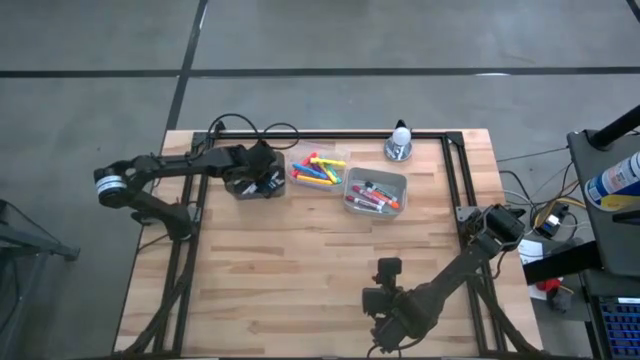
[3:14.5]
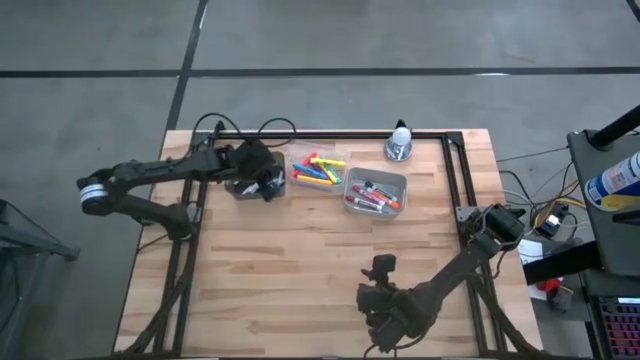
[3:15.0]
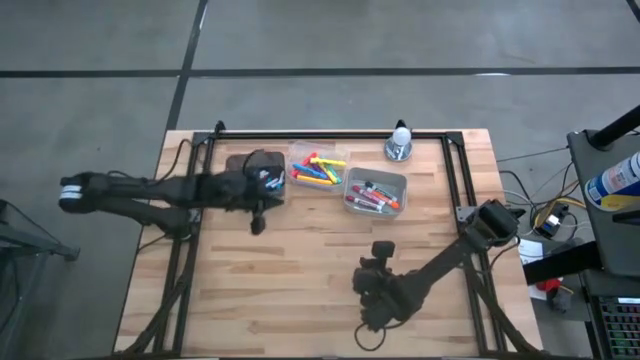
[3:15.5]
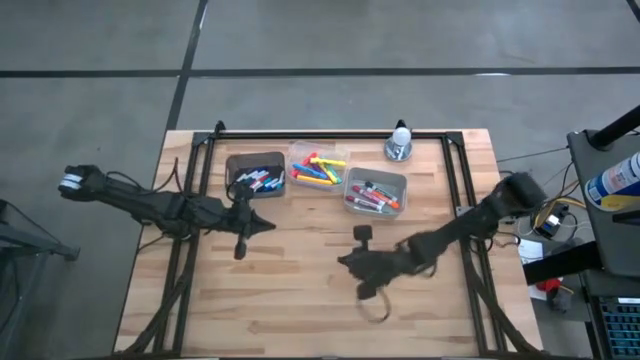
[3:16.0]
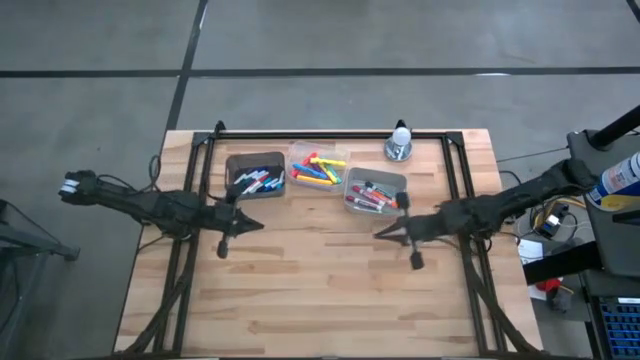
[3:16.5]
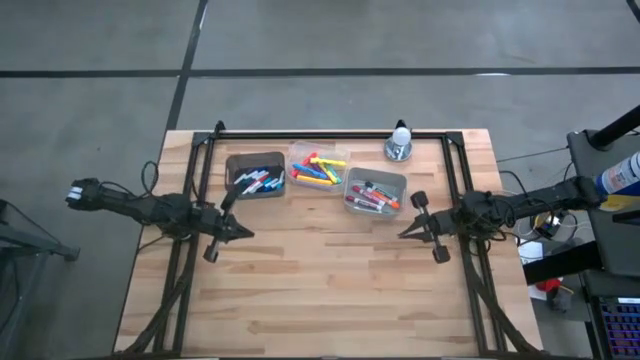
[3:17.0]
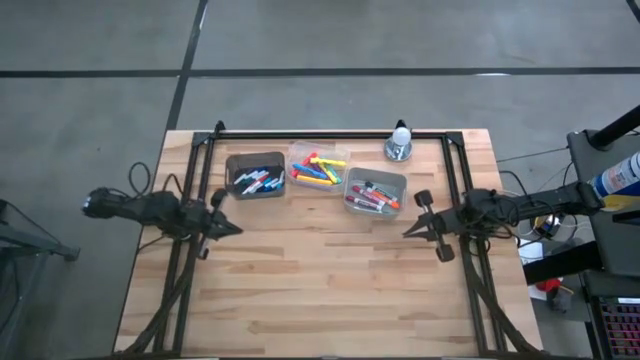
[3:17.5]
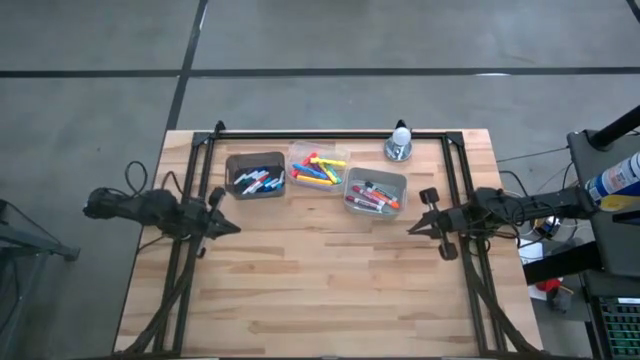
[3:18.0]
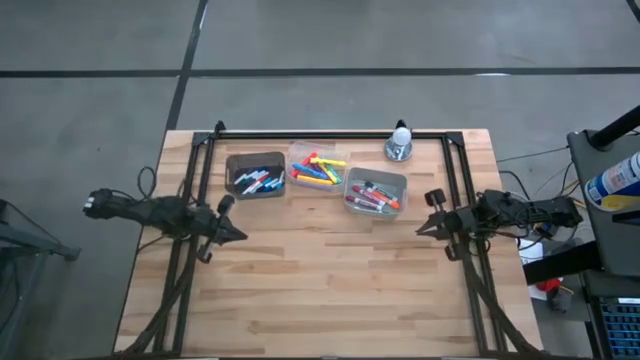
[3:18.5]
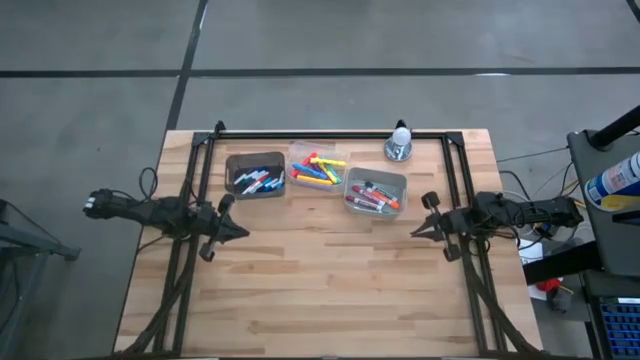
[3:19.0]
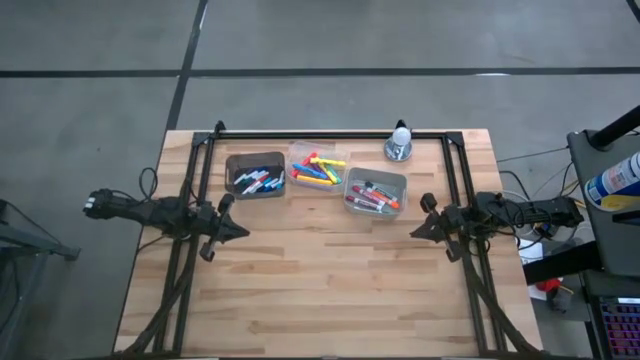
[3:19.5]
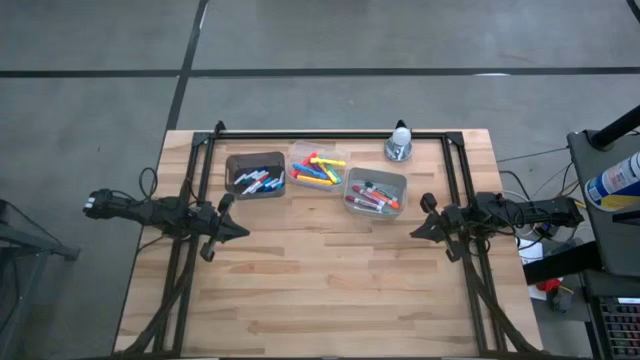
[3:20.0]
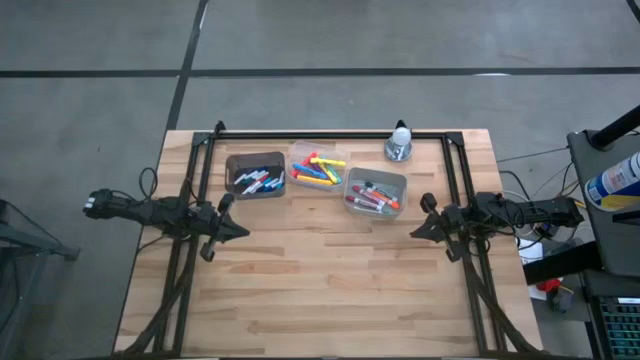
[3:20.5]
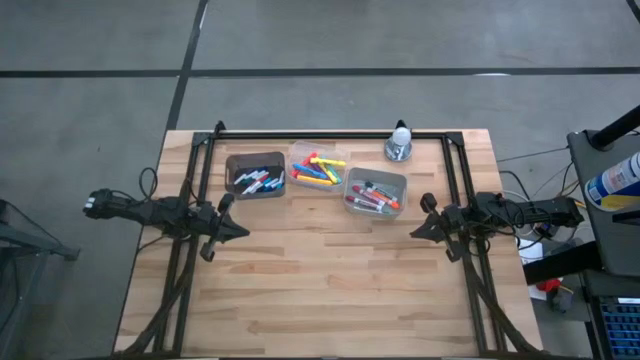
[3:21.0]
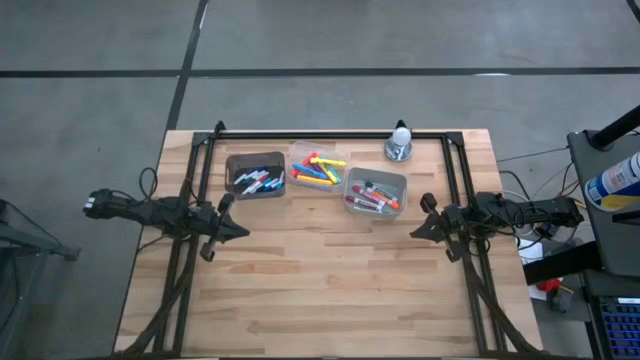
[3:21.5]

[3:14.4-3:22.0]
Task: Pick & Place Markers
Return to Home Position

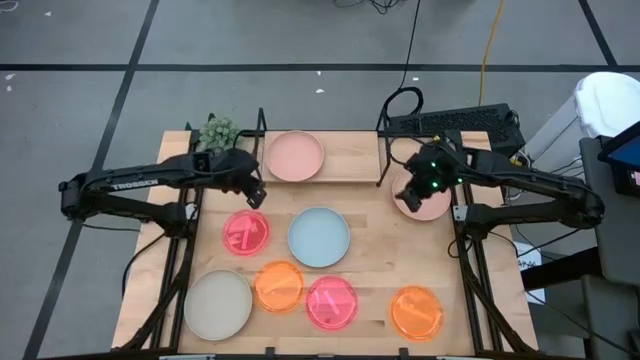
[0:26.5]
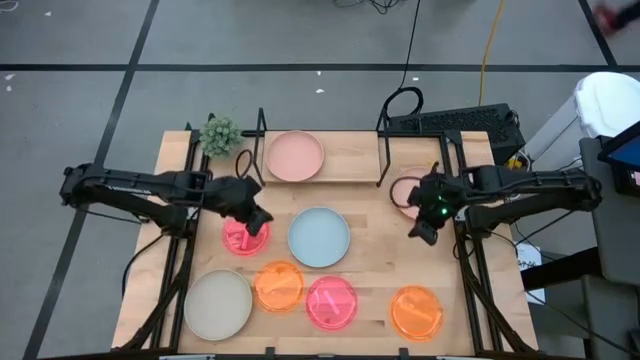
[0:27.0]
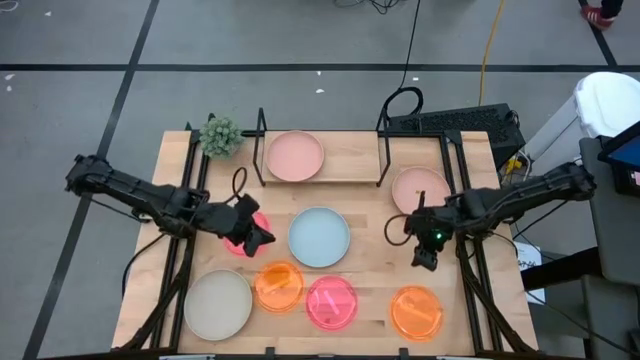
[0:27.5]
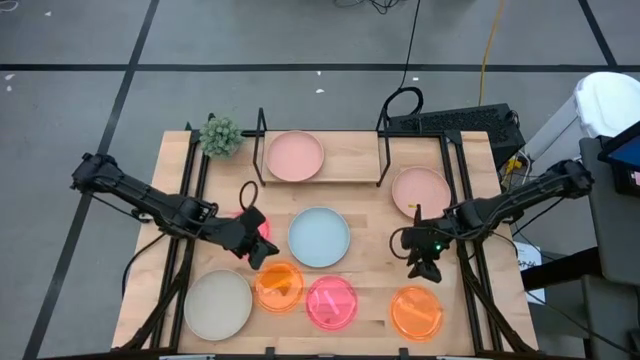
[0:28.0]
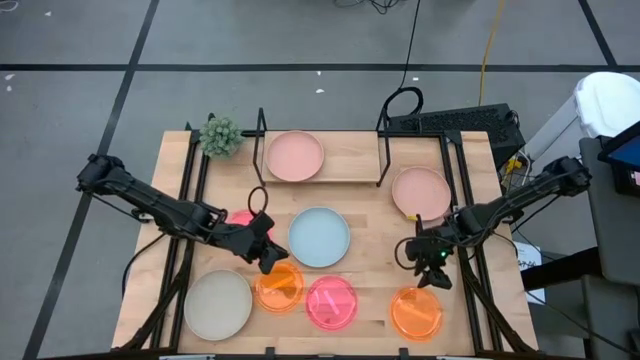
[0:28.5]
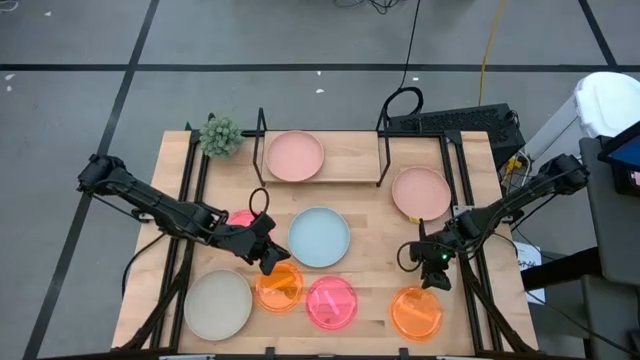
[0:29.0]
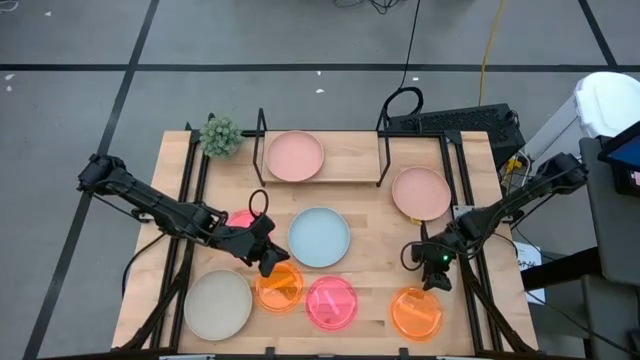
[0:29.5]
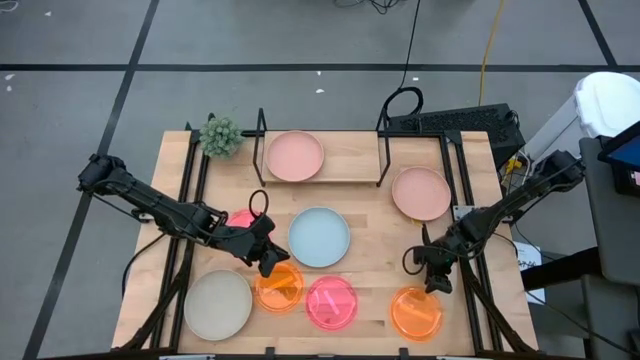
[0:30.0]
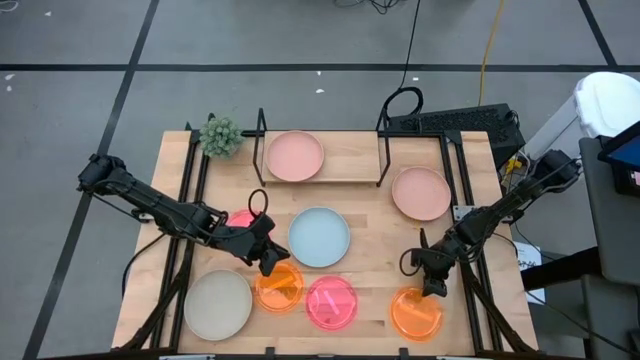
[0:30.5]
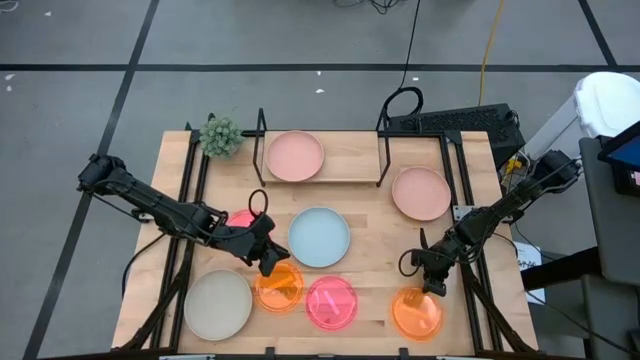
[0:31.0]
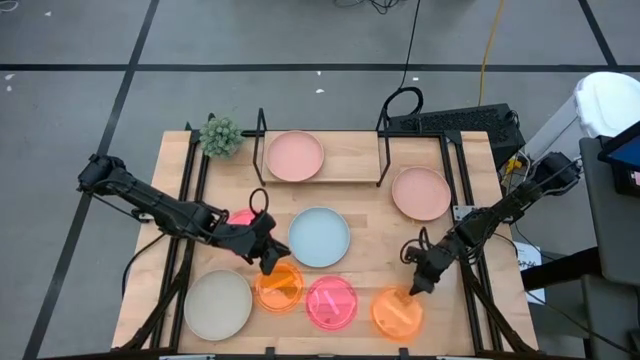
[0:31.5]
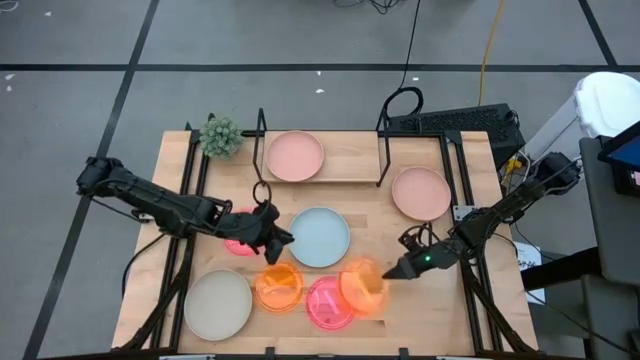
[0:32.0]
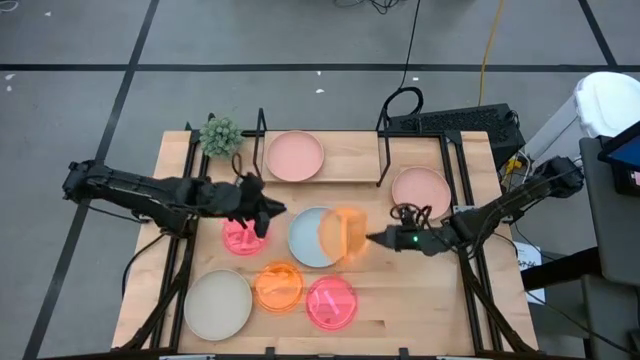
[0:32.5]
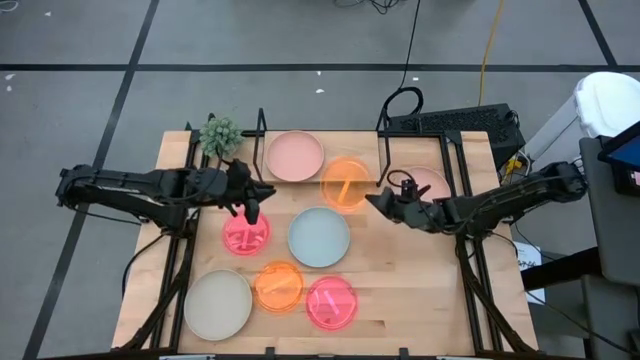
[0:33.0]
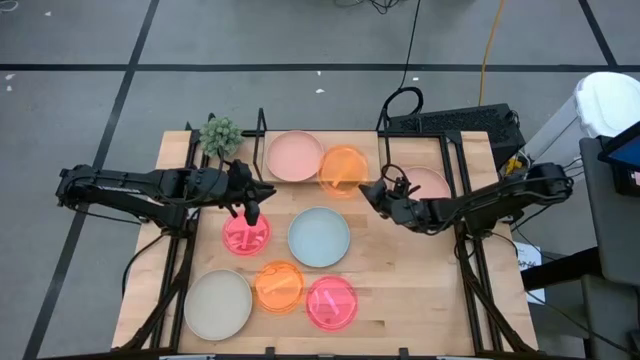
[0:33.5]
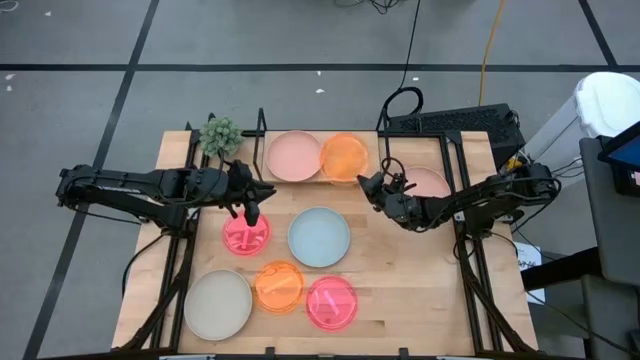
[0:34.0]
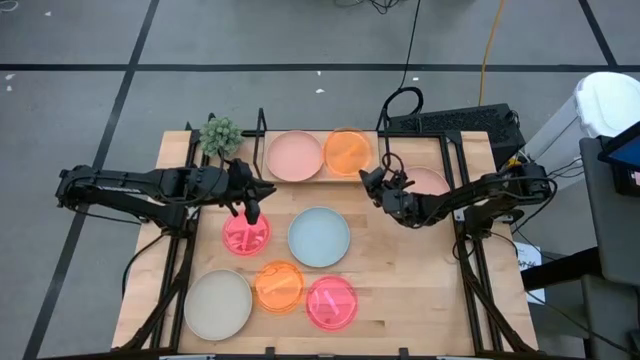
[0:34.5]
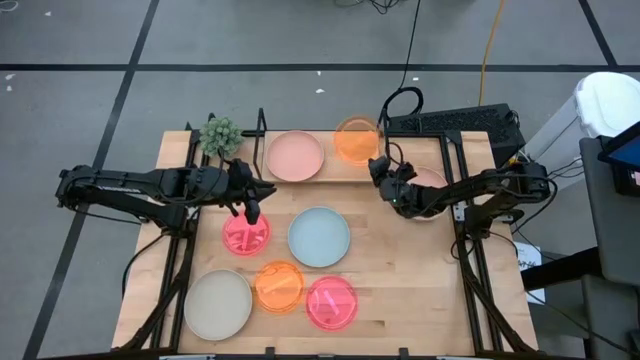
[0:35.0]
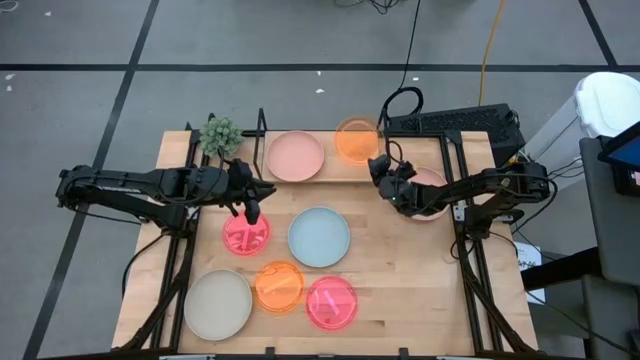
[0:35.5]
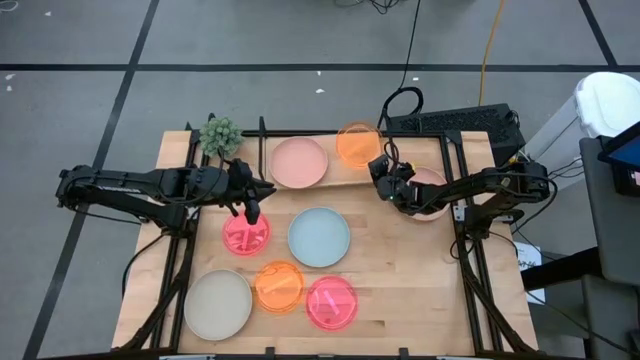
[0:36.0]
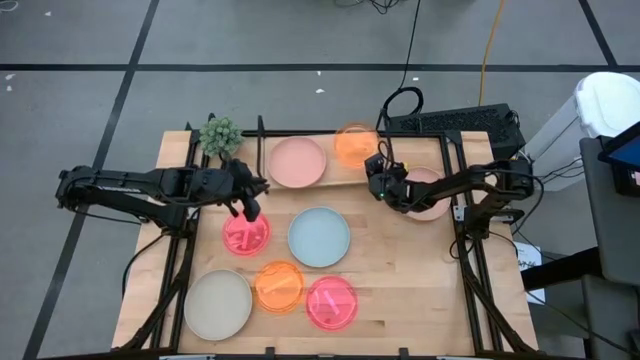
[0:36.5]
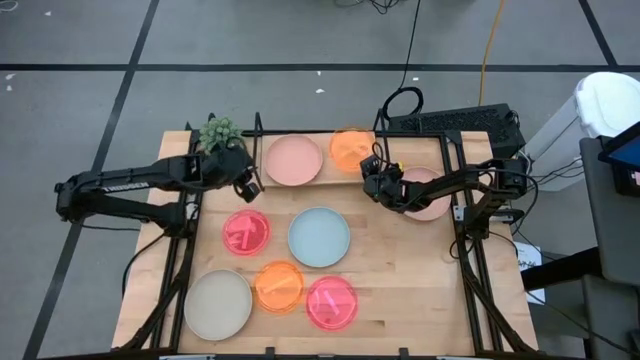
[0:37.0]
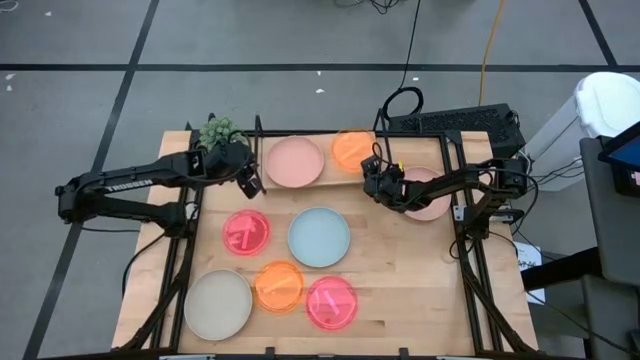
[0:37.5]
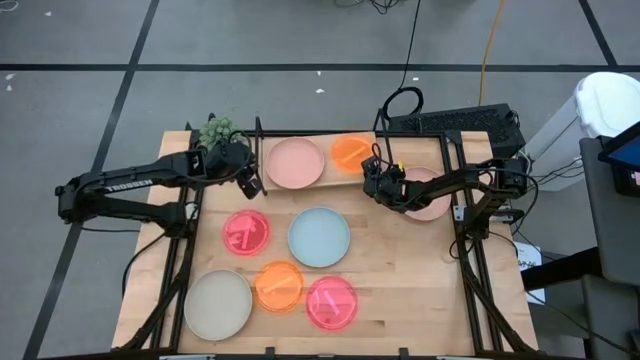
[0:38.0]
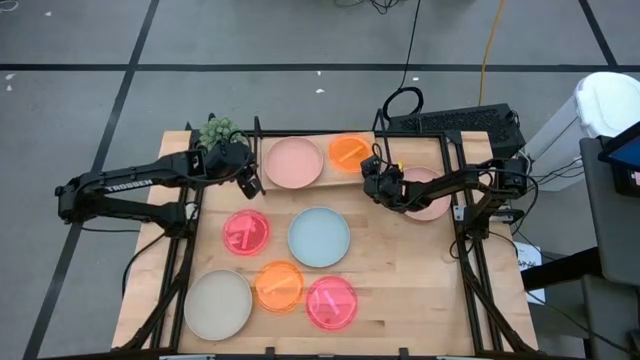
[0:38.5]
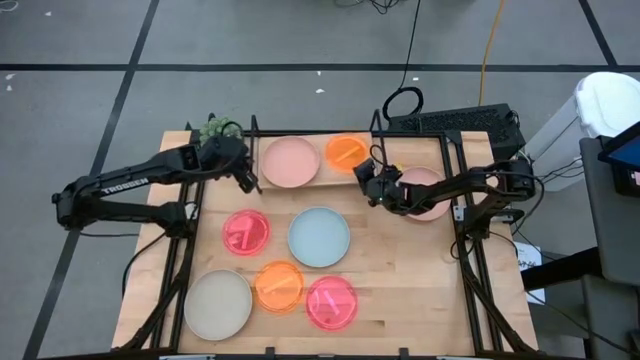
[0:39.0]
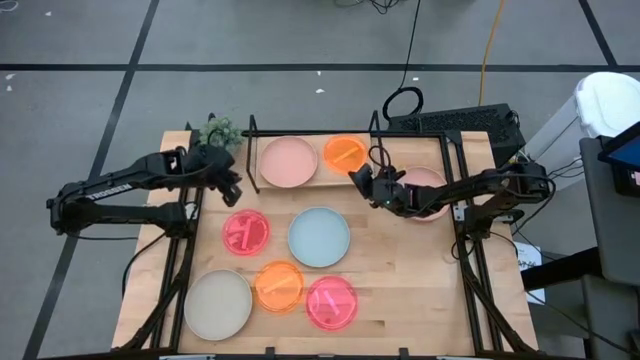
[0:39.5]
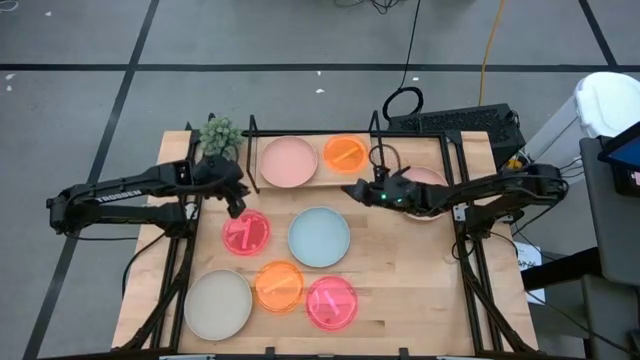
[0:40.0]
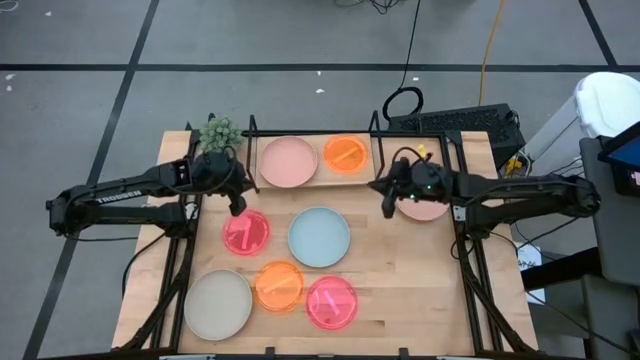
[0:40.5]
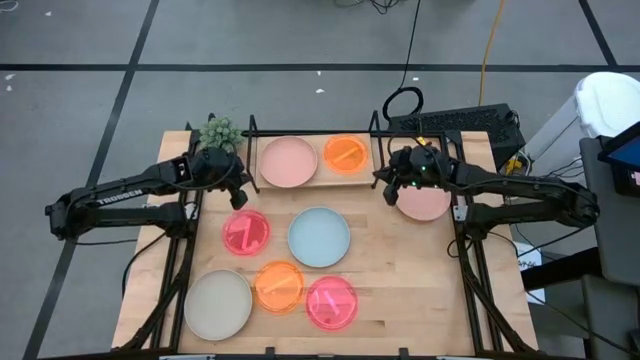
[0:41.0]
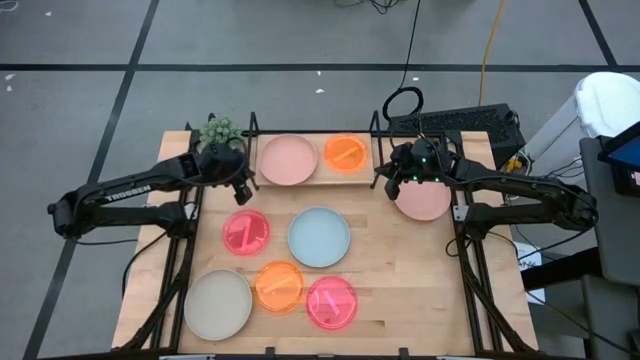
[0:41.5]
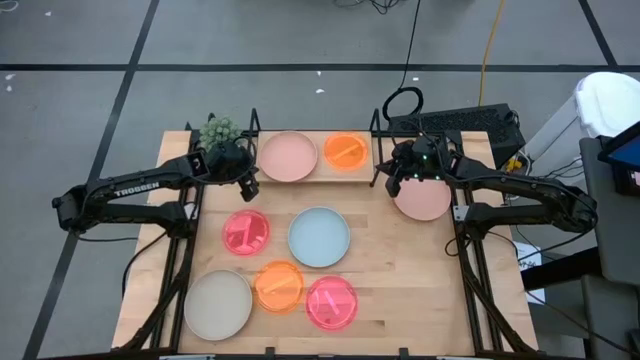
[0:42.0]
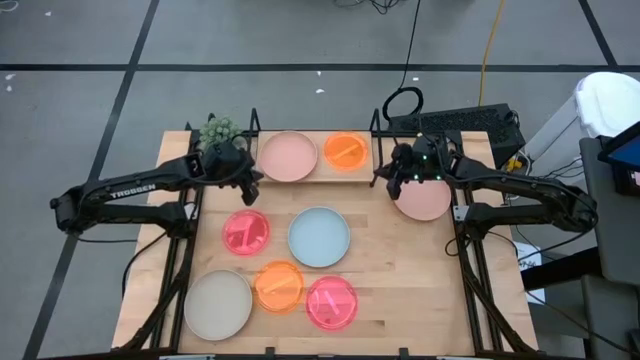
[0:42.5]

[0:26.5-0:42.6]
Task: Place and stack plates onto a shelf
Put the right orange transparent plate on the shelf
